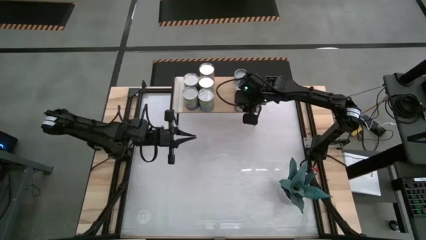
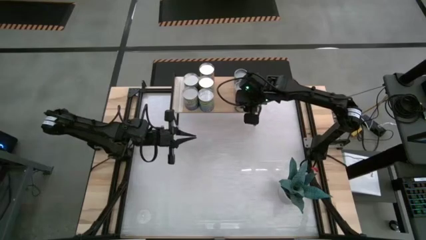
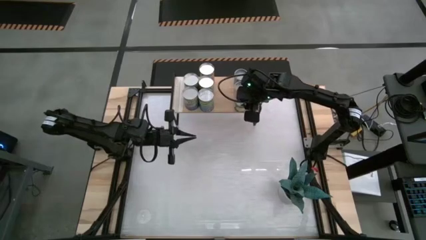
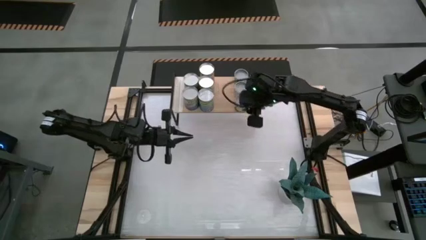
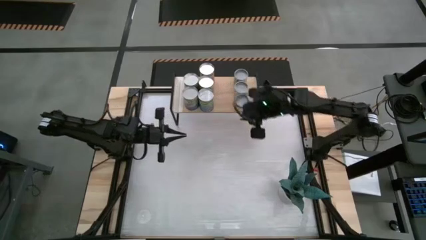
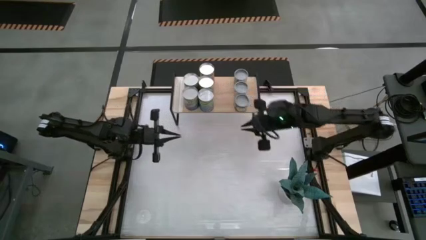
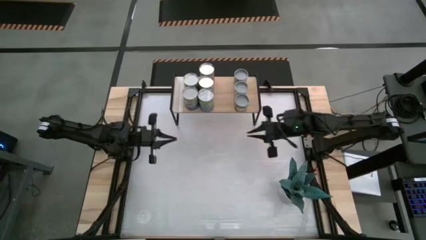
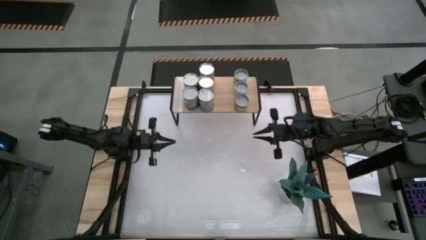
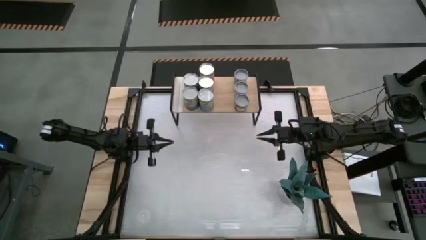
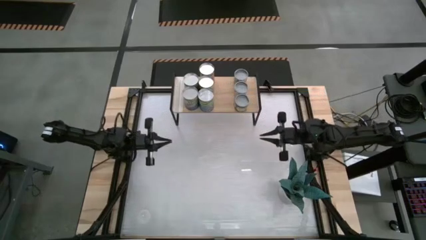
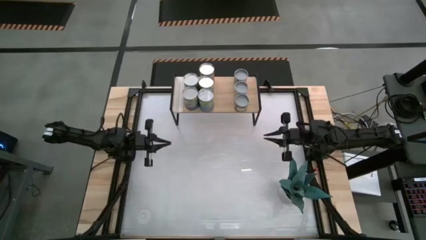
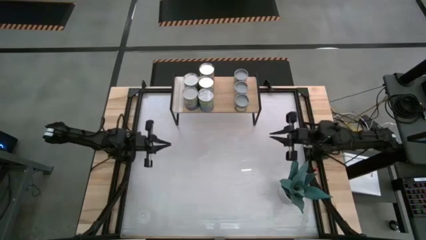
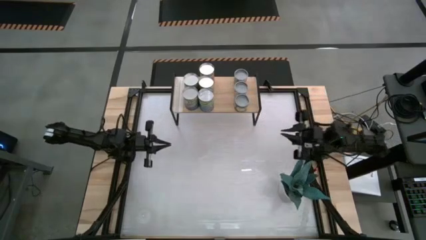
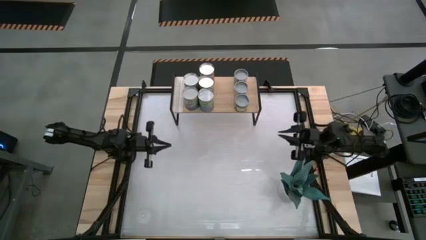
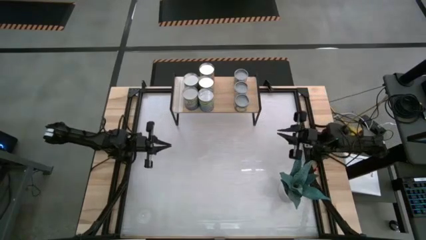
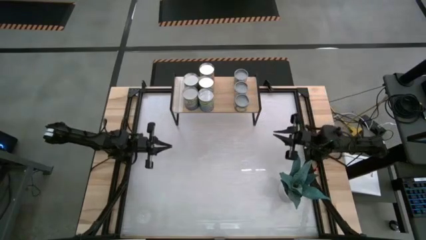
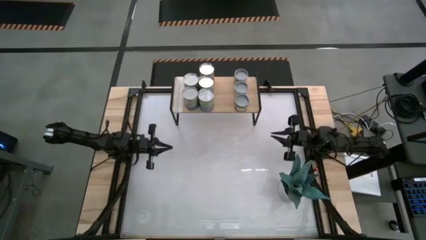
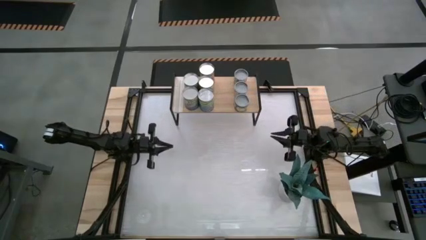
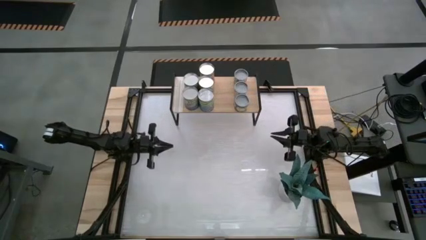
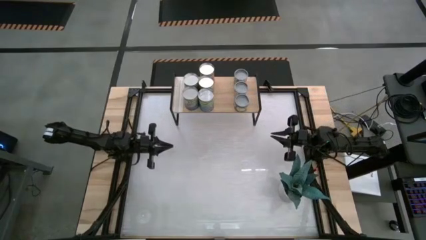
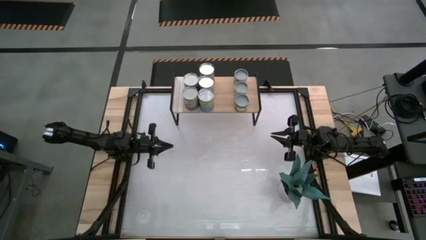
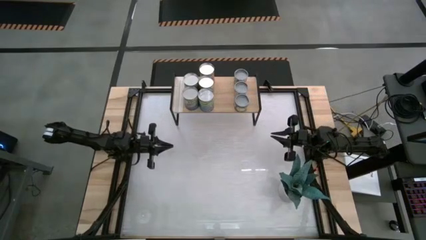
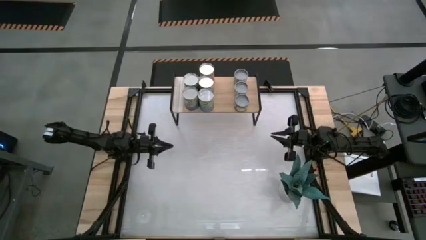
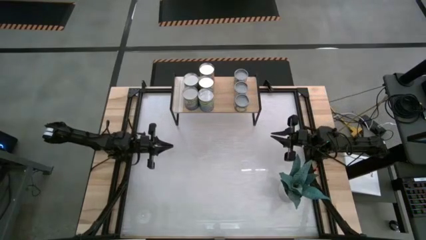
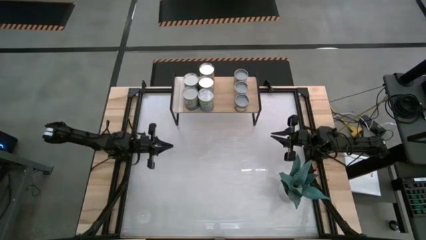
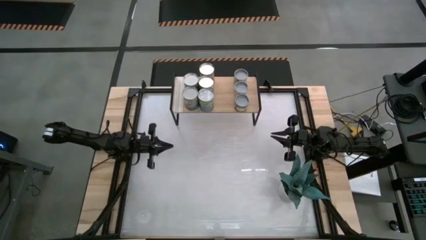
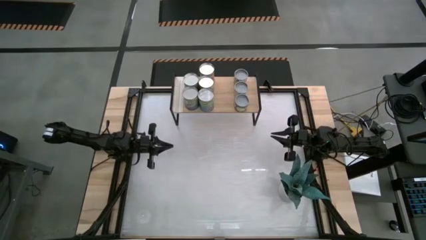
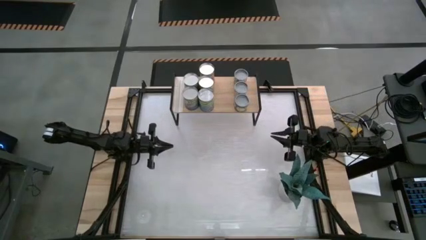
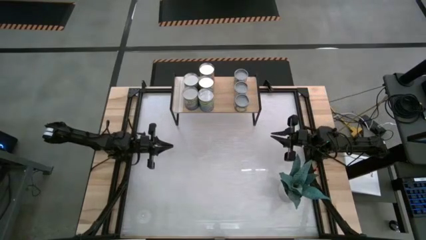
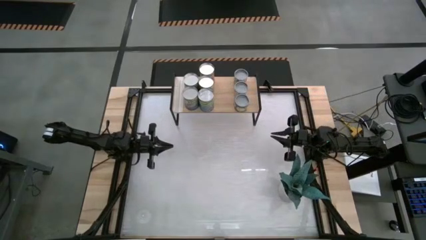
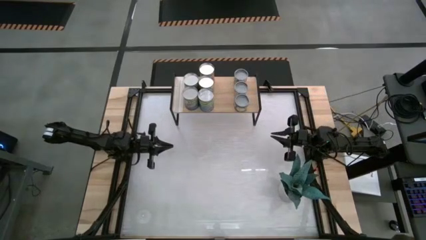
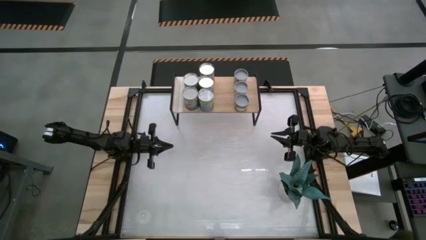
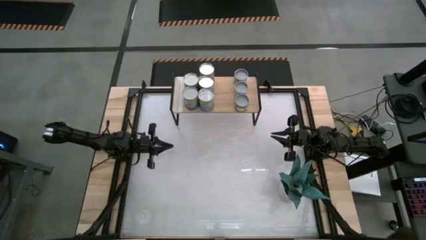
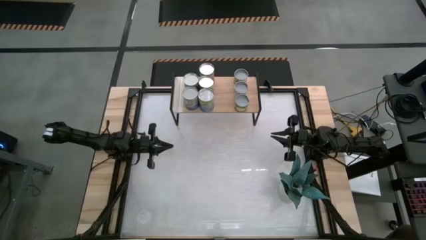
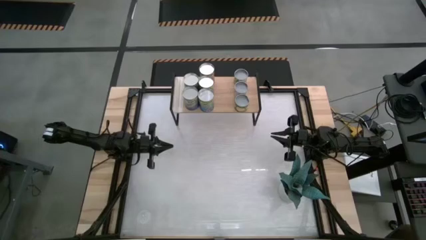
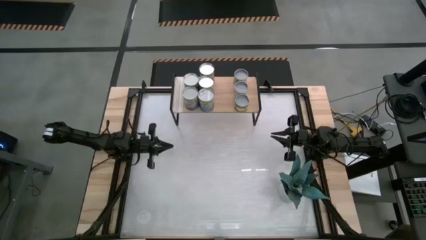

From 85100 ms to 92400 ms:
Task: Pick and place cans onto a shelf
Return to Home Position

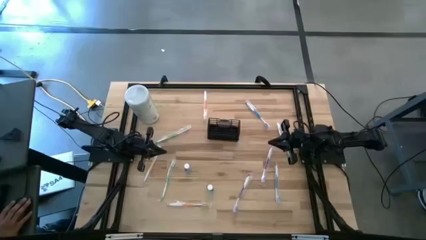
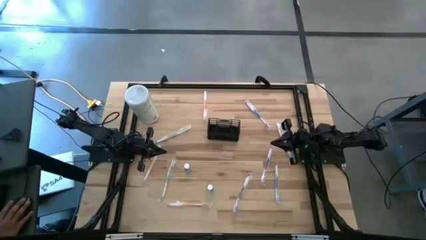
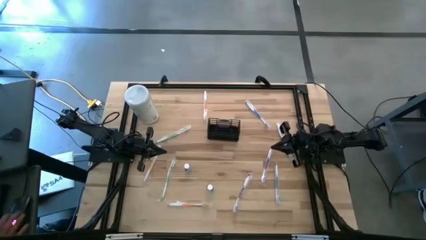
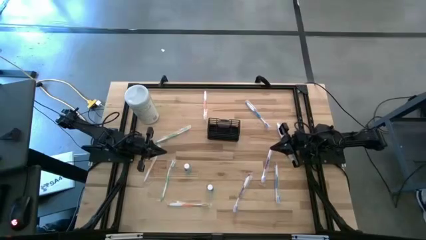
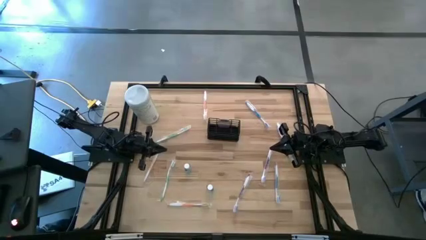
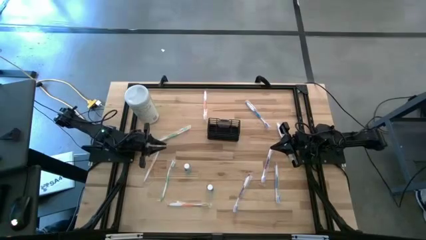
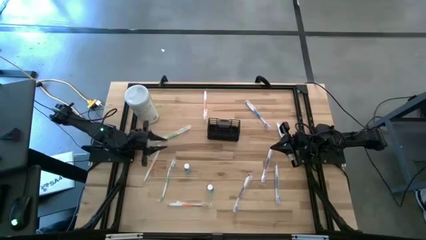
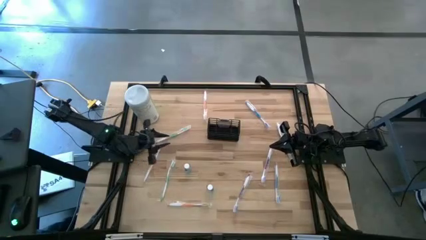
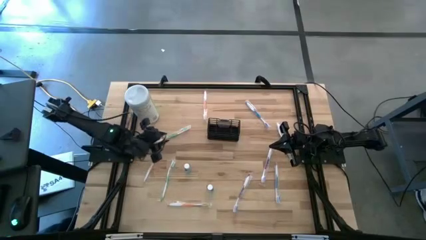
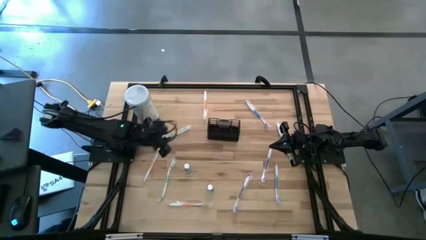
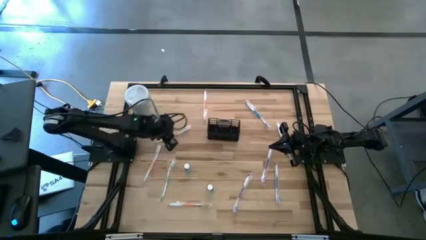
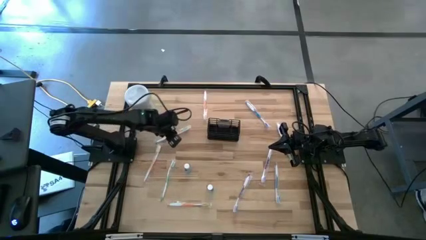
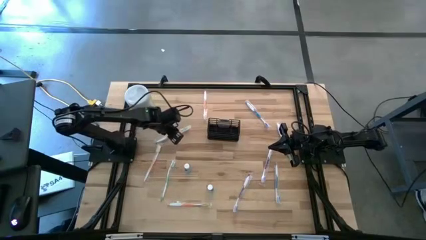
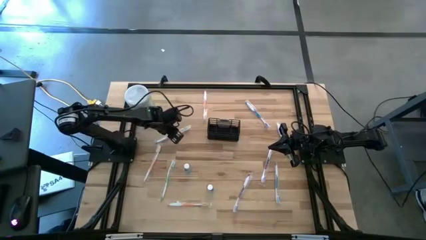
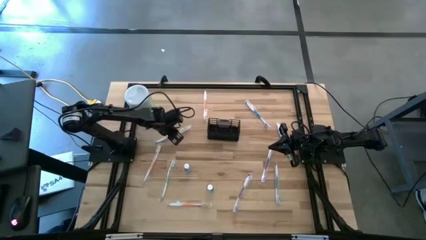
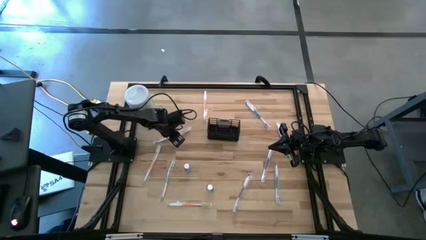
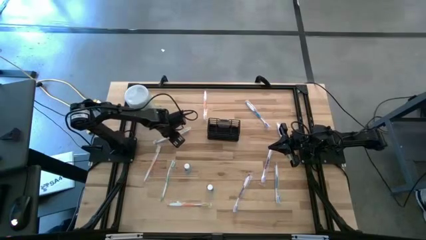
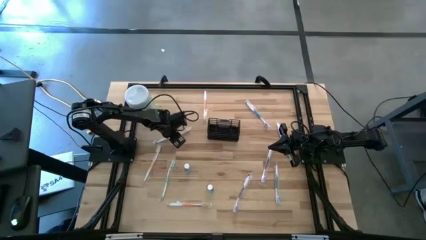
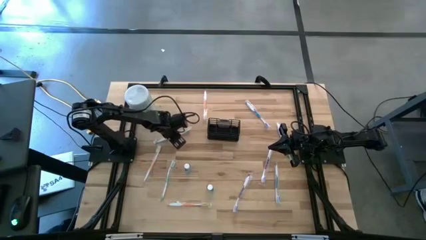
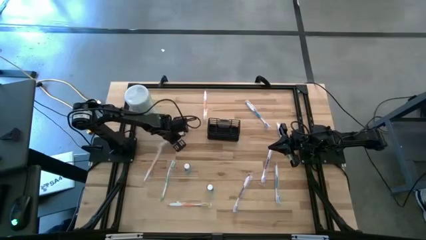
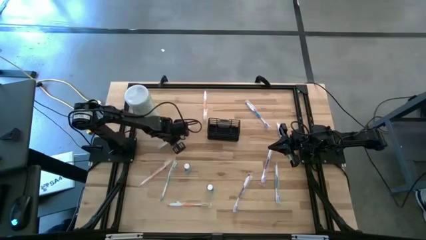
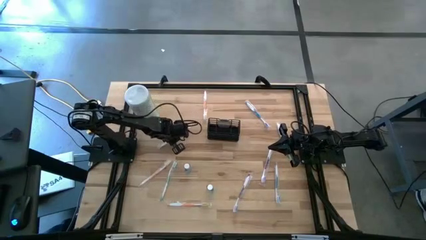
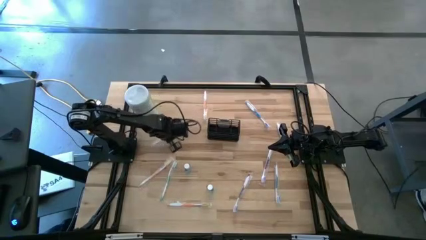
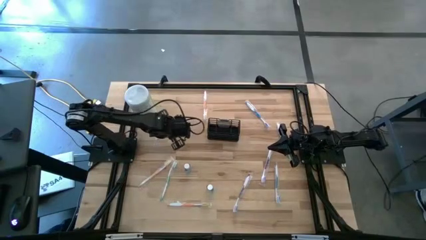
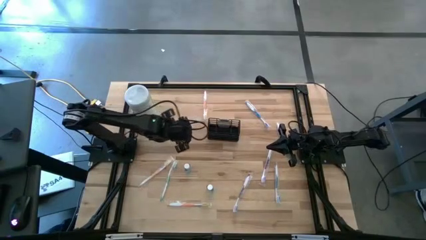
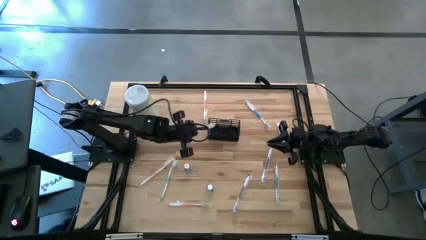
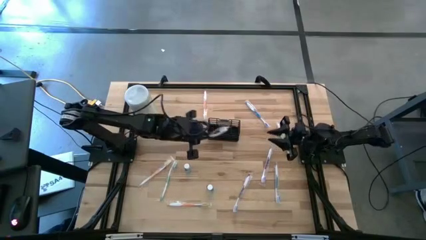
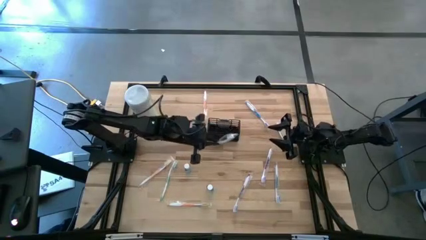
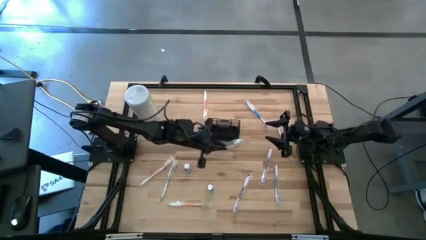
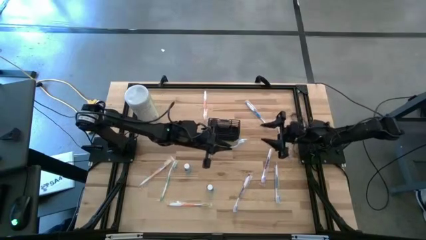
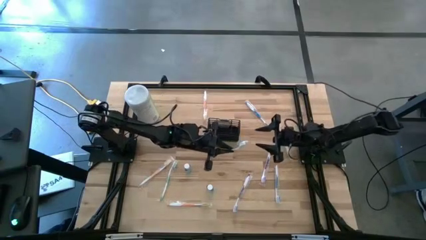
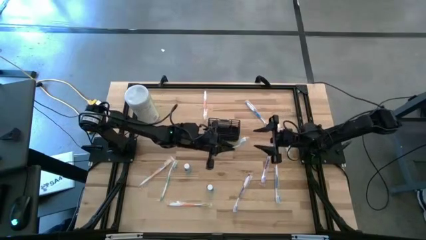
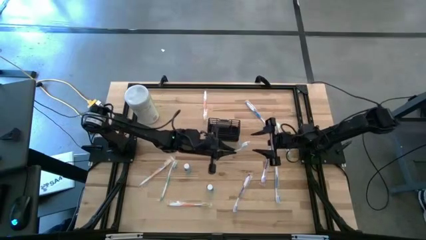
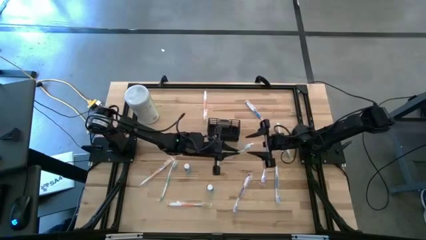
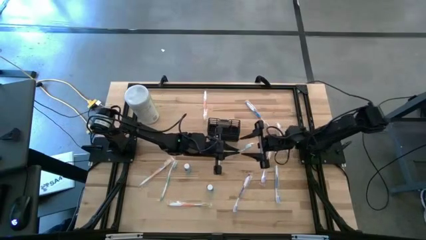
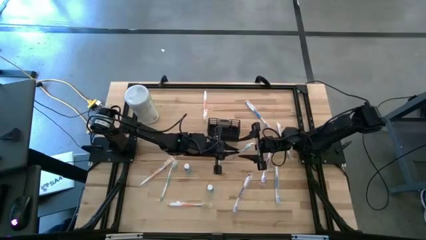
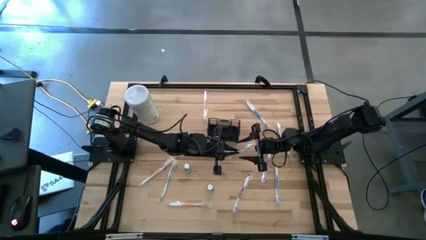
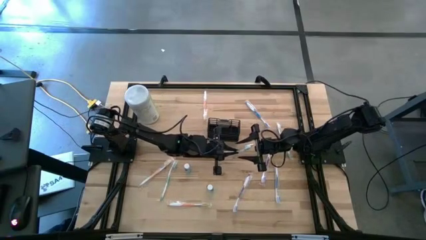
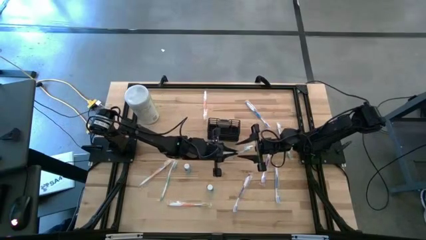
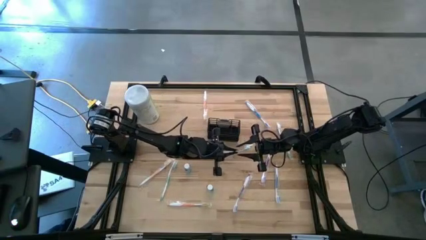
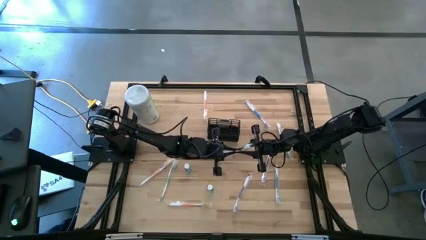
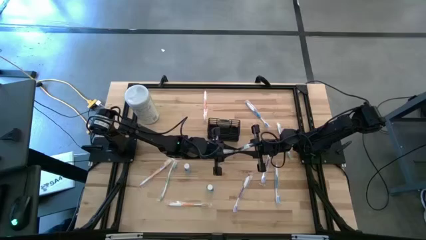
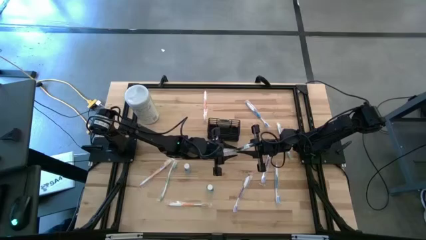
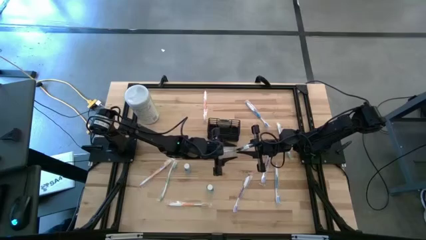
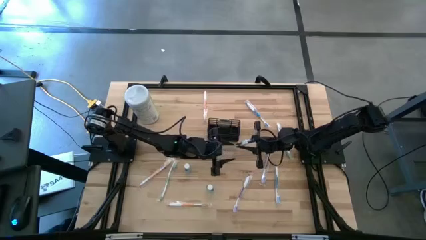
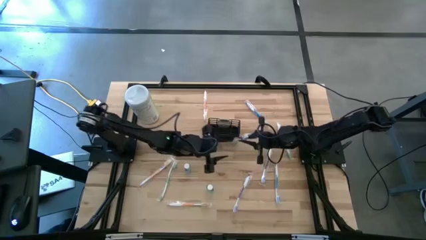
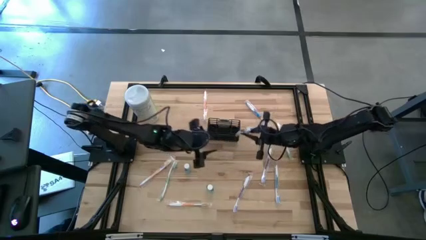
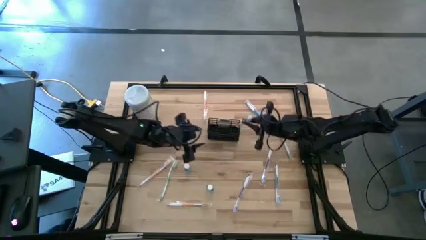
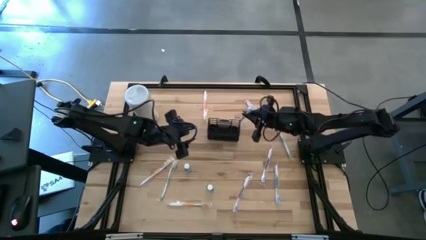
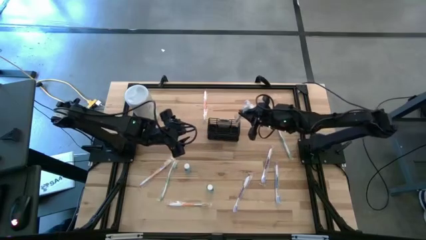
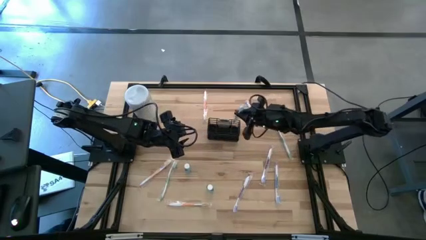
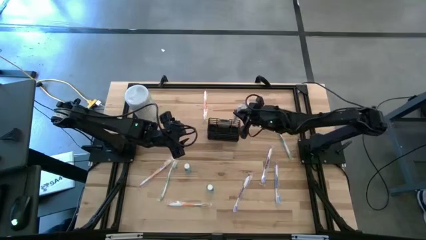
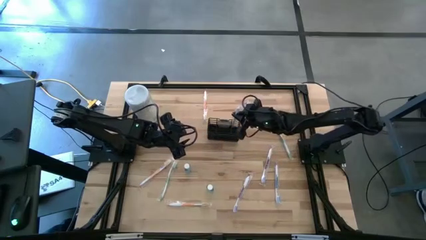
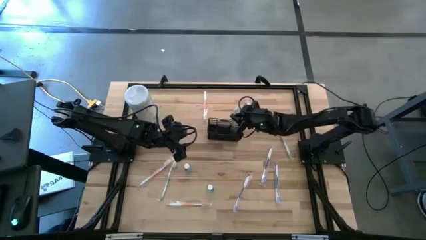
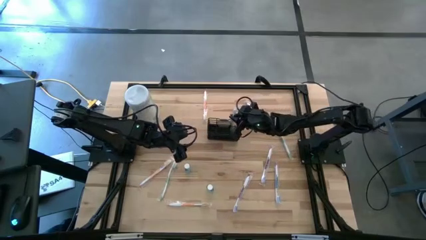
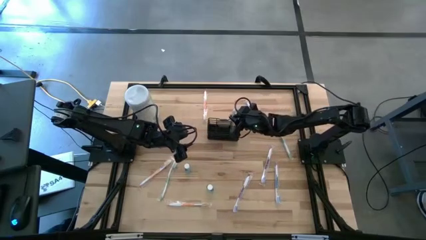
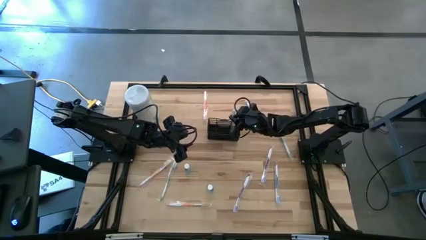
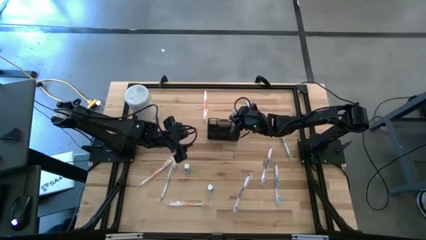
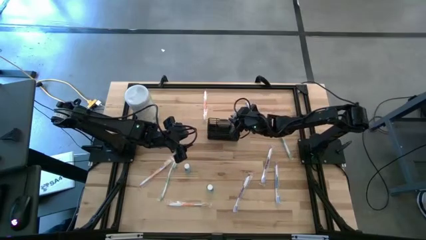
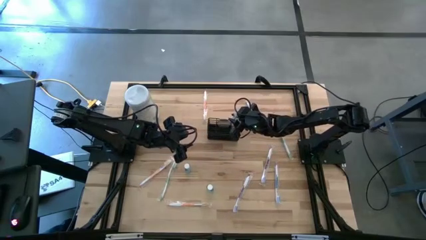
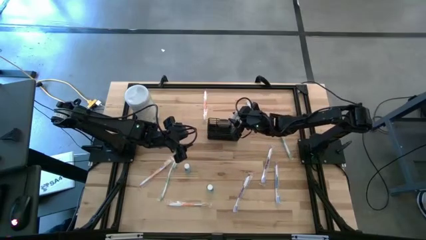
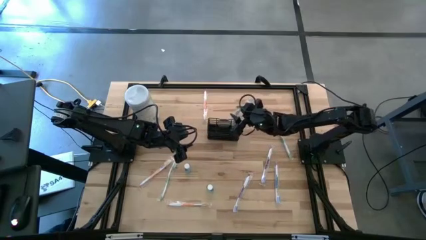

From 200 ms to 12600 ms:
Task: Pick & Place toothbrushing station
Put the top left green toothbrush into the mesh organizer
